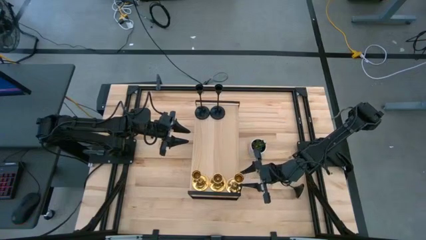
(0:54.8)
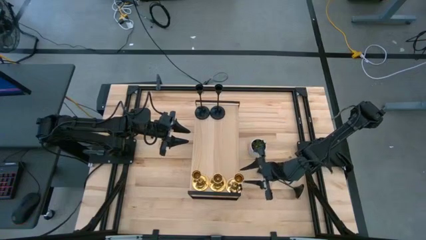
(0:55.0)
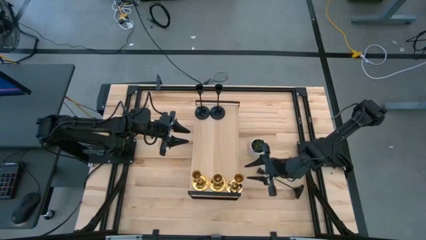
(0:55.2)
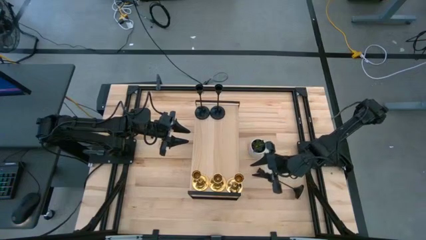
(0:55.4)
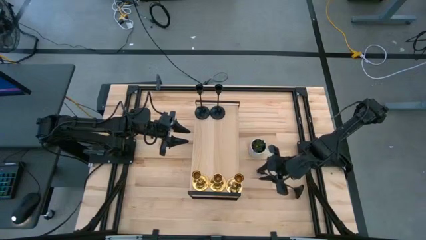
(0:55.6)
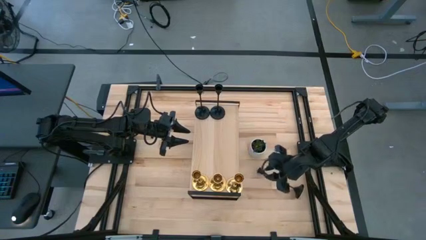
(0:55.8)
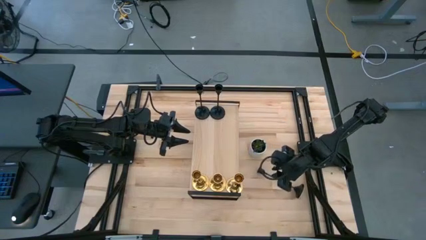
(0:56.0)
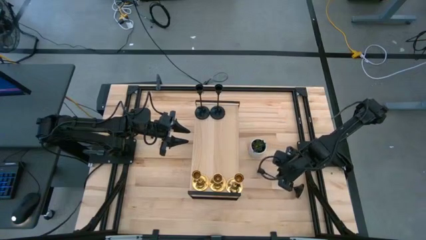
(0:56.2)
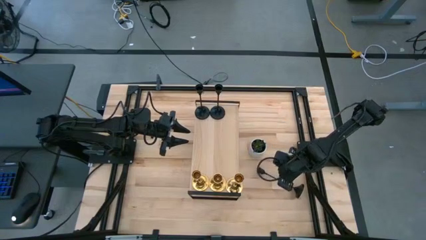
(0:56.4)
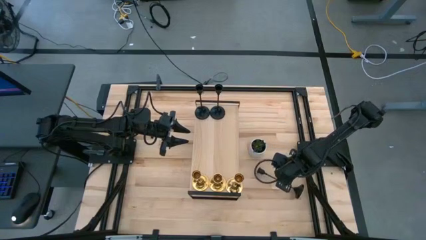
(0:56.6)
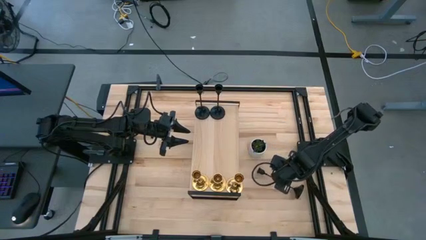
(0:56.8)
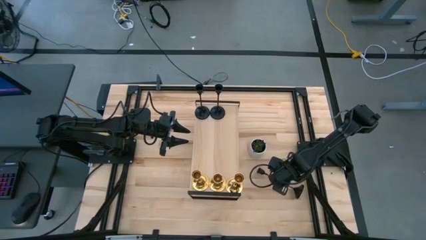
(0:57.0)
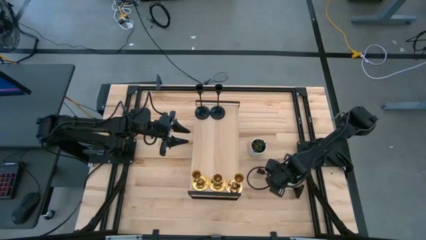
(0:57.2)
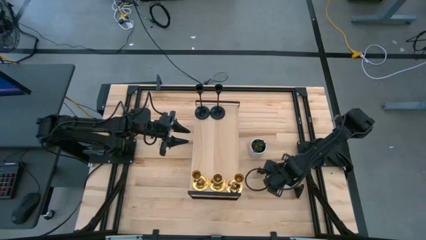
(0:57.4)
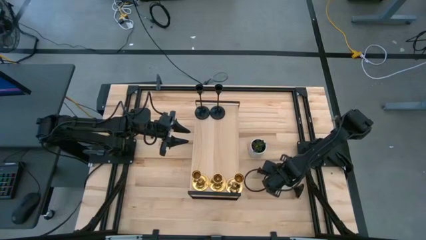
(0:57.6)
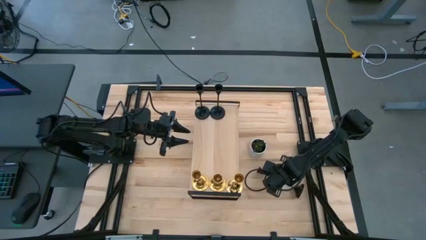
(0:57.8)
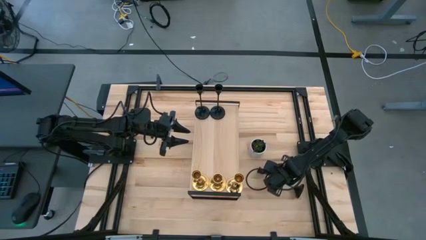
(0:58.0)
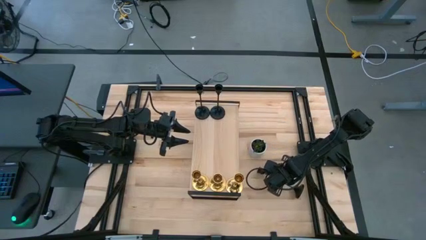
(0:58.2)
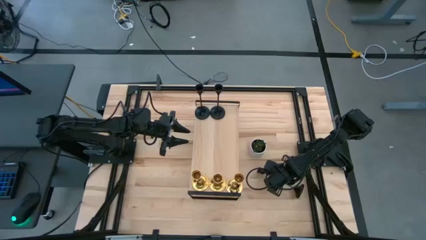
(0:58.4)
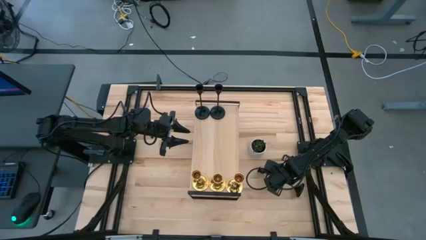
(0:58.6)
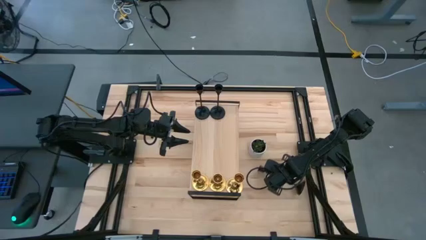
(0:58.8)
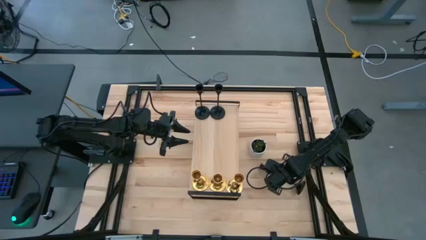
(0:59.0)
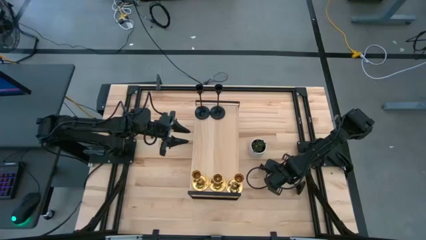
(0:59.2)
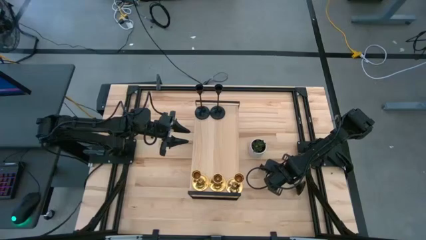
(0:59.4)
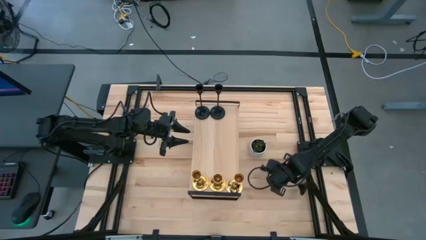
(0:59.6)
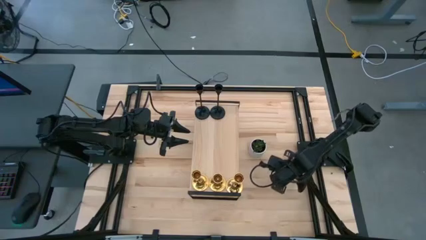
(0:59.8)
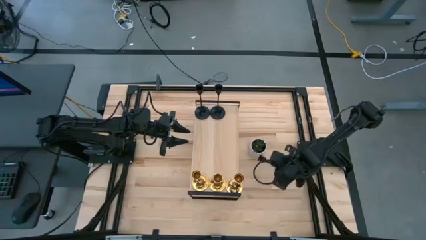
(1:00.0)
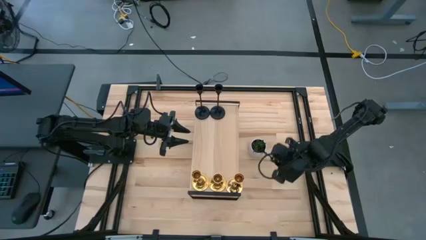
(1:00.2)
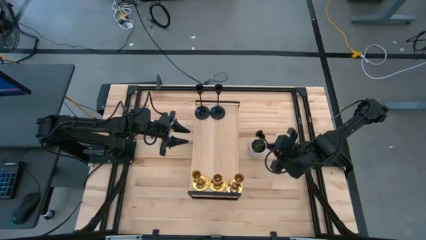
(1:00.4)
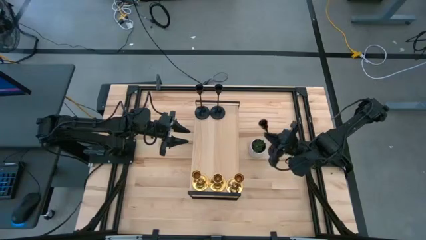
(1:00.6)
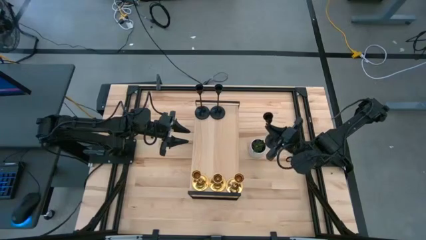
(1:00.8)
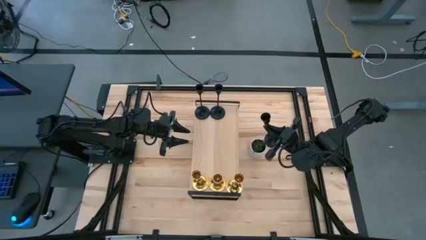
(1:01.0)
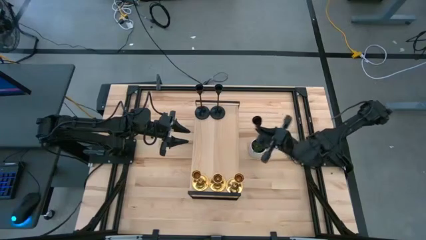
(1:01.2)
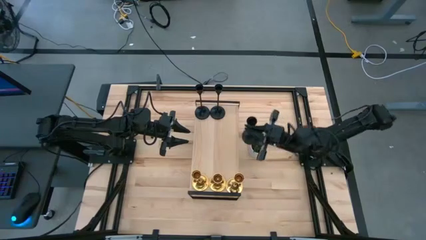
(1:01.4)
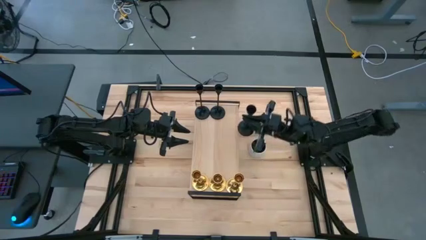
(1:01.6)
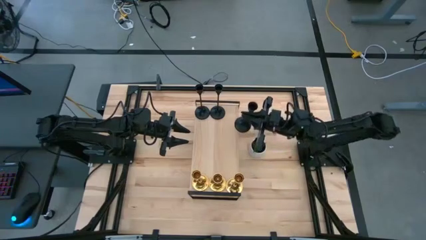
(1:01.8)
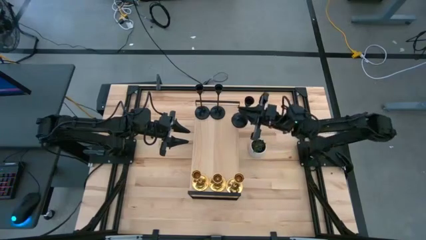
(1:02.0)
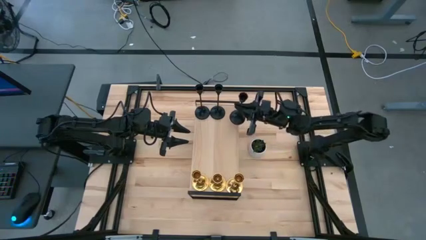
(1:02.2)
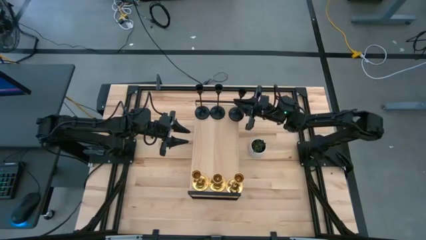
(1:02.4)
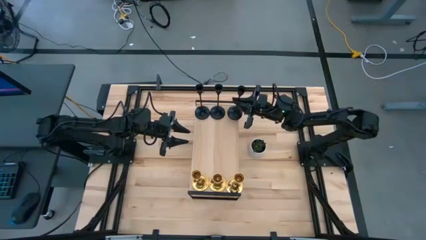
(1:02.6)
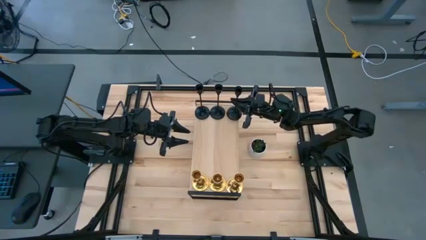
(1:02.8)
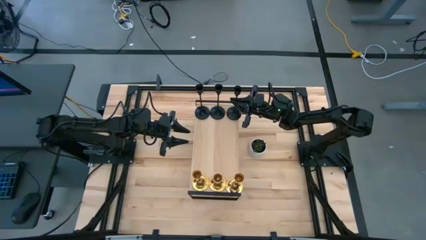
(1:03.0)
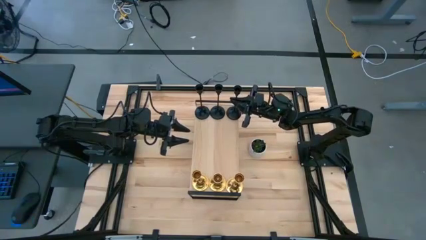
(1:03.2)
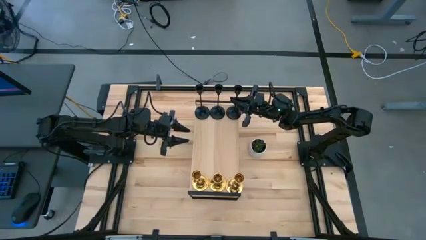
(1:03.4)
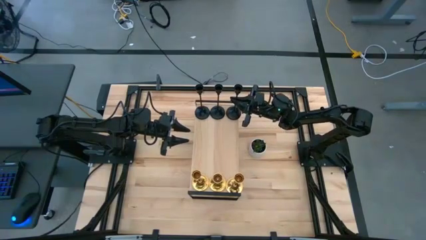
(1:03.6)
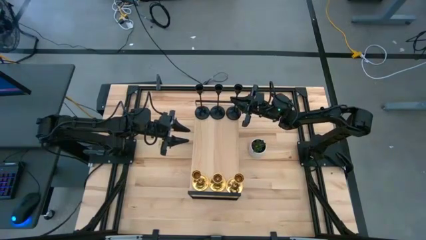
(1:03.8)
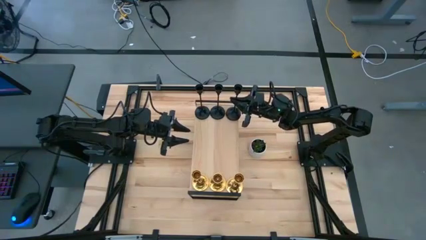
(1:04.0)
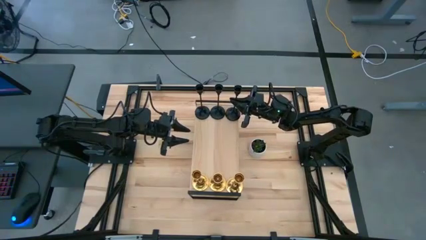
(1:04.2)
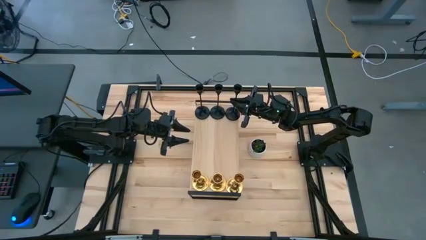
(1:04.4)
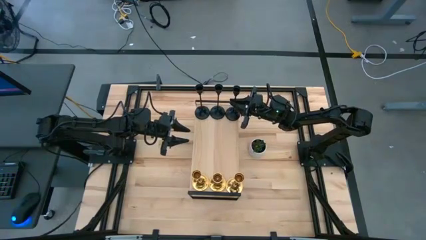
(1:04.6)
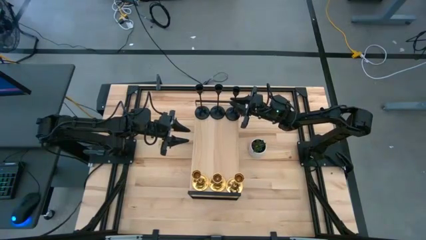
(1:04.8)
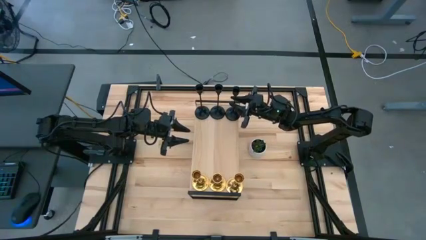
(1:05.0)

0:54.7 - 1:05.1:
Task: Pick & Place candle stick holders
Put the black candle holder on the shelf aligned with the other black candle holders

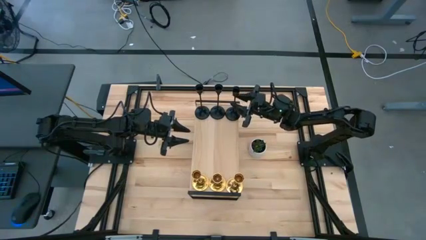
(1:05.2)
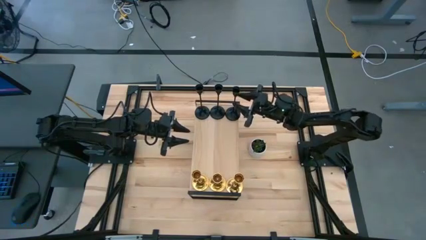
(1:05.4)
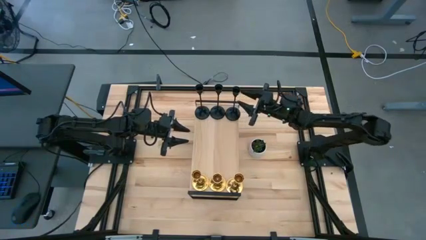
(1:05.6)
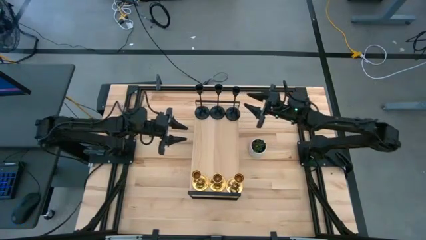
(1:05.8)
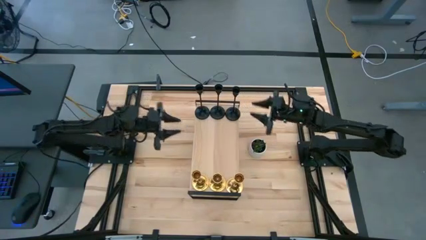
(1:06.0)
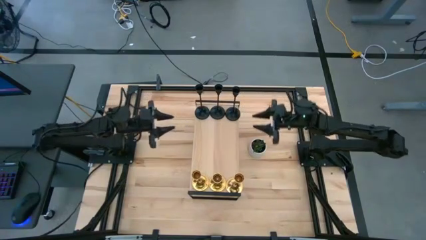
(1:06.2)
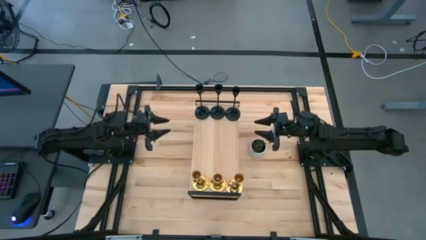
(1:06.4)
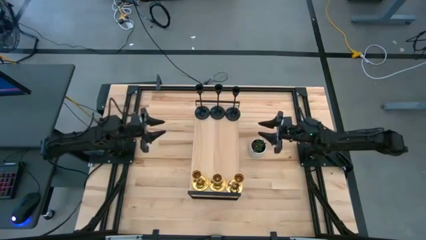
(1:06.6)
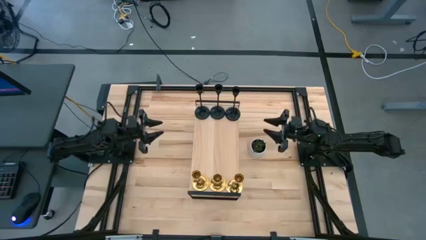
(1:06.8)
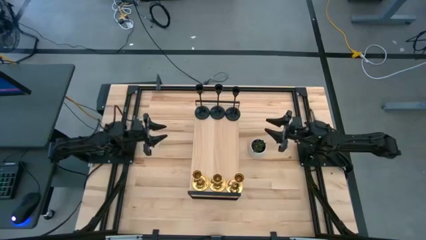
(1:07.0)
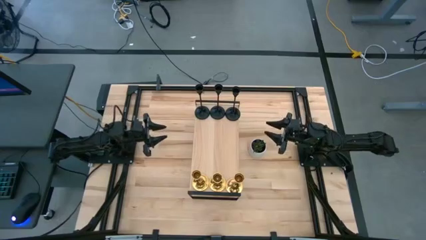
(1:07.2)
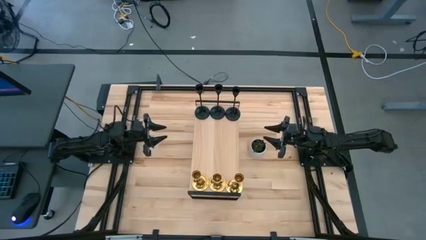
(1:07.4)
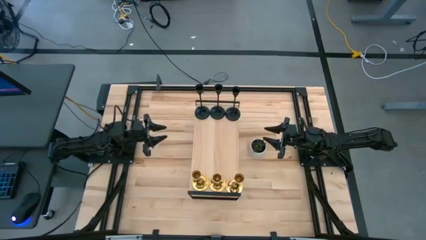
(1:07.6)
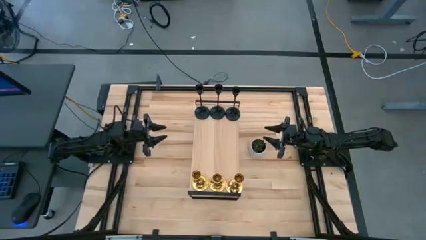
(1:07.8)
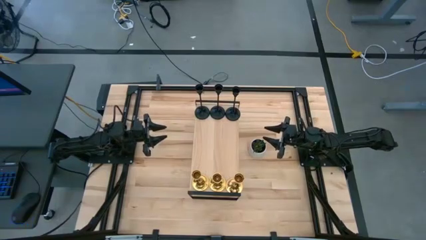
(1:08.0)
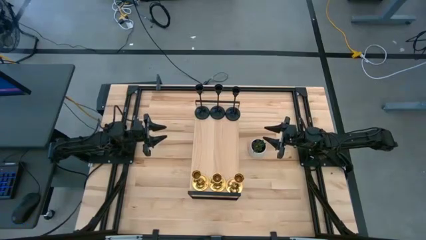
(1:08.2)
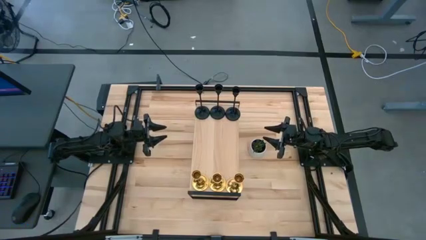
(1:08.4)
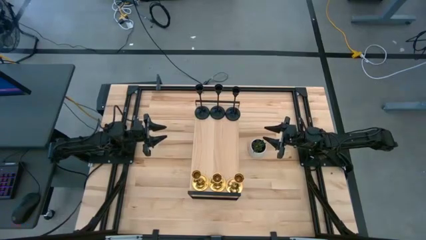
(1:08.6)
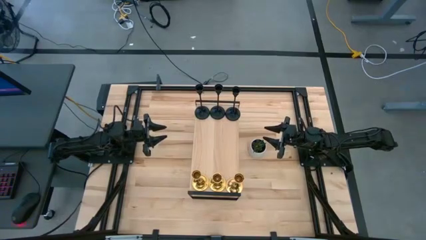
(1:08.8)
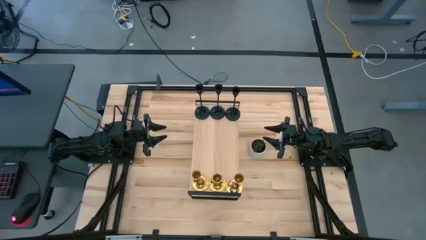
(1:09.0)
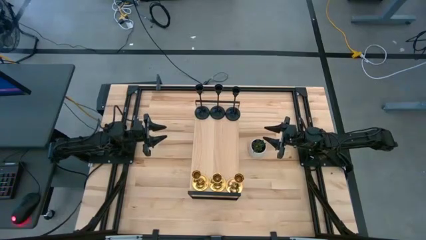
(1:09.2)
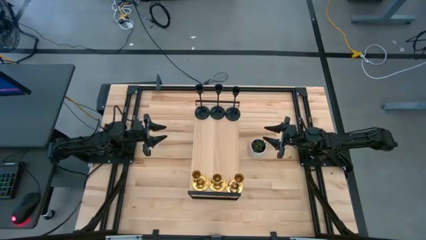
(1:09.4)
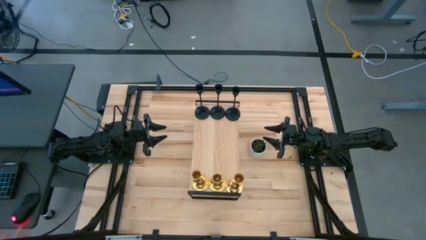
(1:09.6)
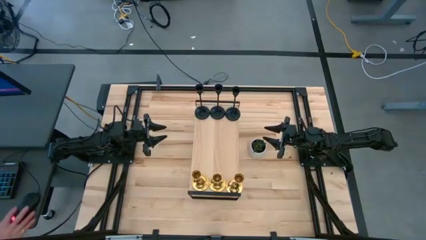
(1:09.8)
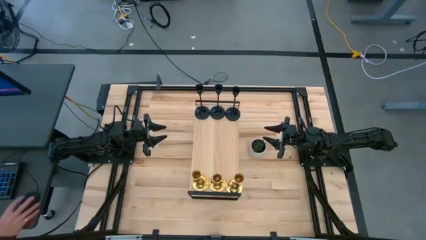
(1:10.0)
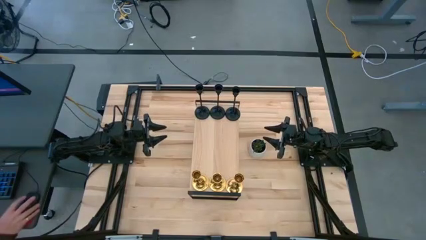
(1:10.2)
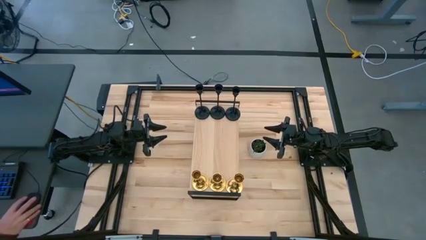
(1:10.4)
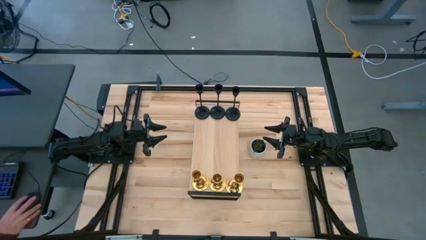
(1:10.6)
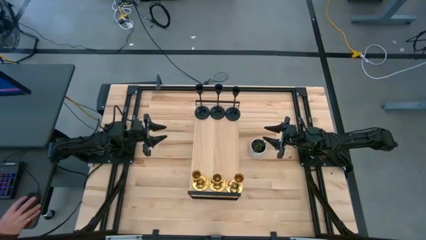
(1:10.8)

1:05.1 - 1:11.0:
Return to Home Position

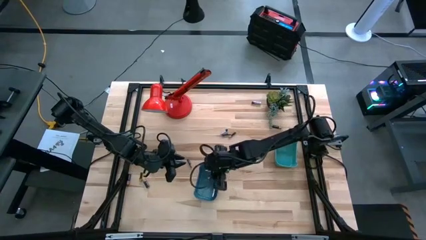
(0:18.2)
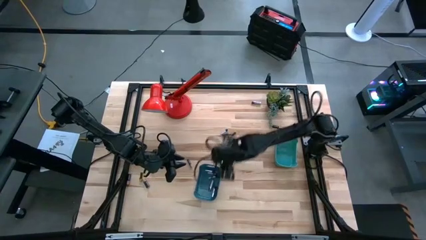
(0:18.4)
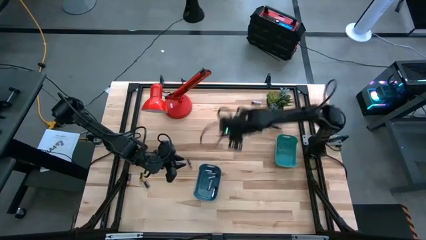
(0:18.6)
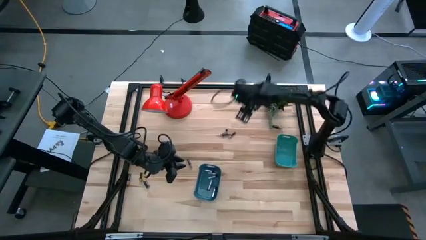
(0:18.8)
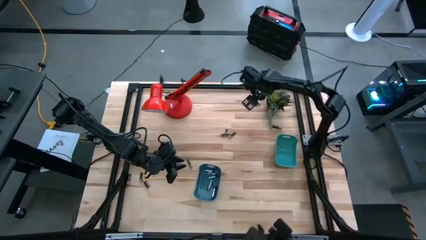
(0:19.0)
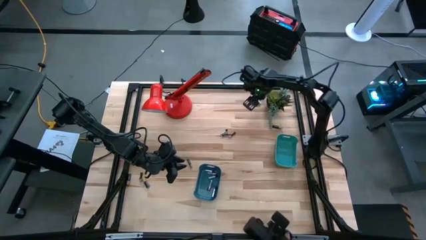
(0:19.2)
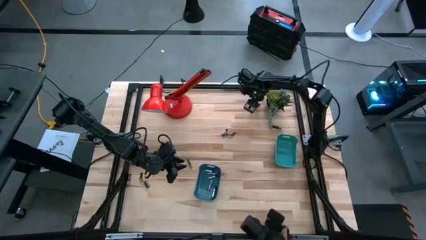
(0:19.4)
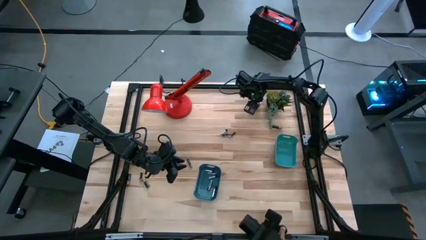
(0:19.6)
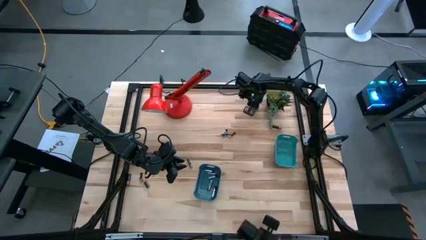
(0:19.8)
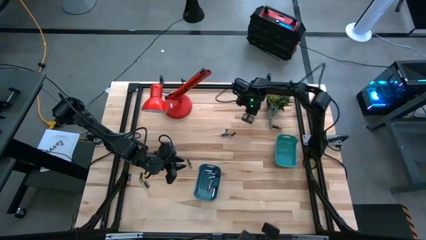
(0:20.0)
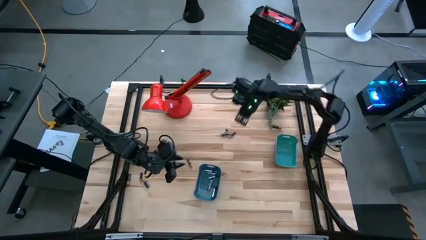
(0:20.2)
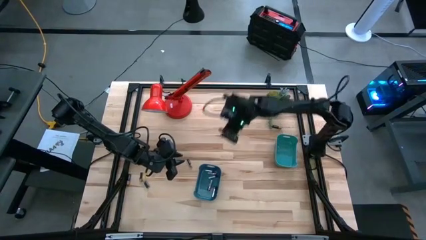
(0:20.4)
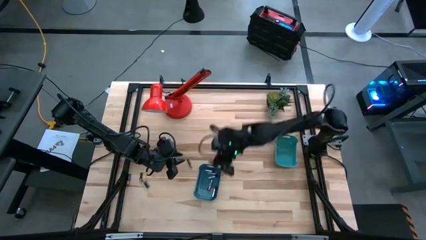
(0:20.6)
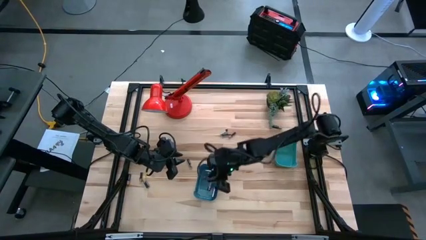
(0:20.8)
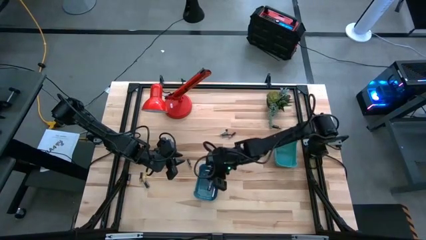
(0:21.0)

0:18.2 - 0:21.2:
Task: Sort batteries
Put the silver battery into the blue bin
